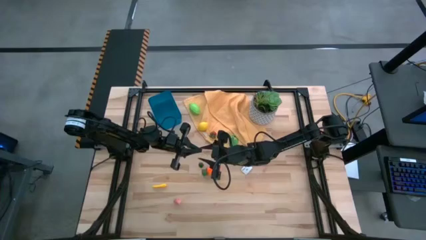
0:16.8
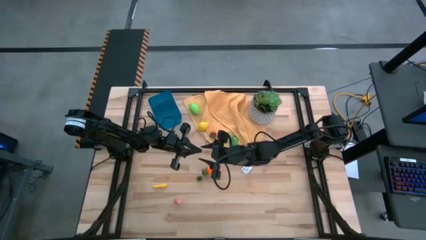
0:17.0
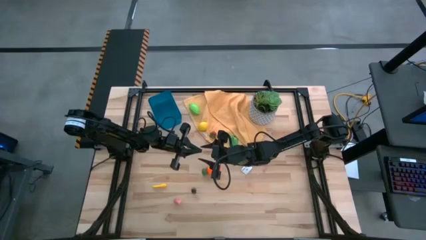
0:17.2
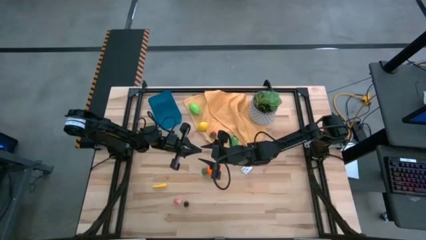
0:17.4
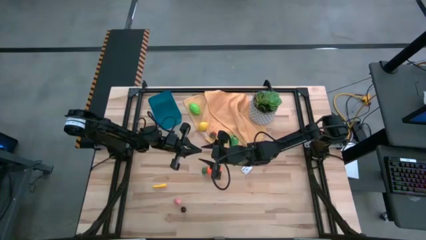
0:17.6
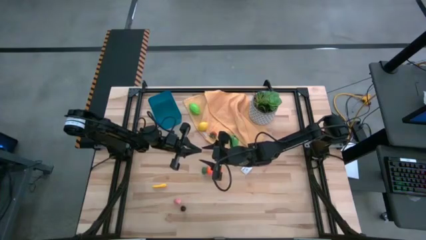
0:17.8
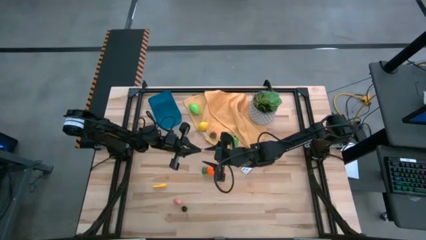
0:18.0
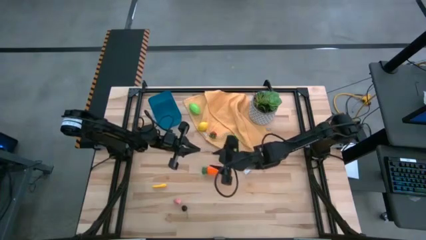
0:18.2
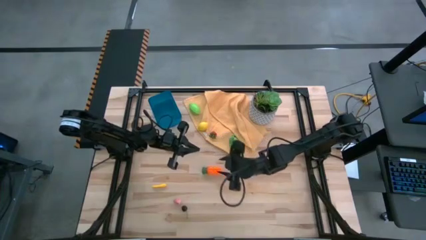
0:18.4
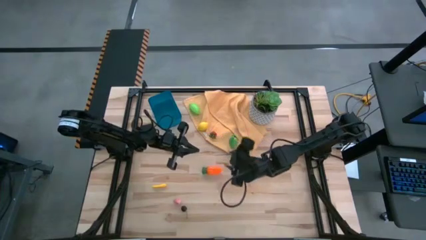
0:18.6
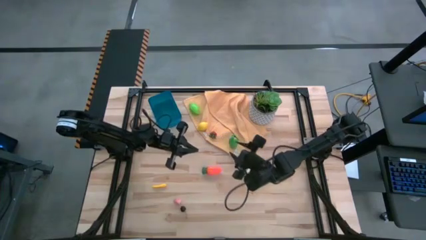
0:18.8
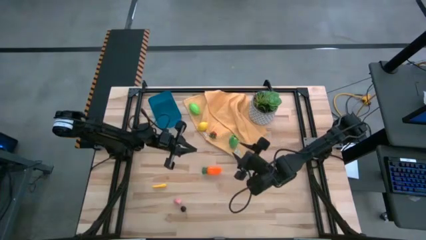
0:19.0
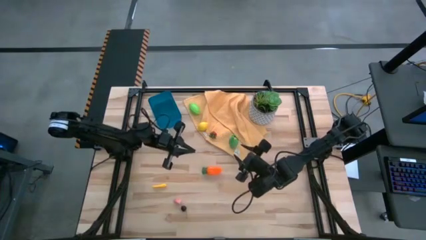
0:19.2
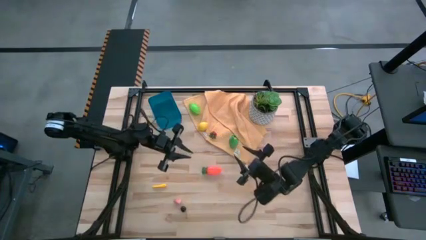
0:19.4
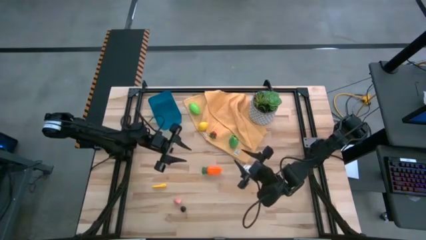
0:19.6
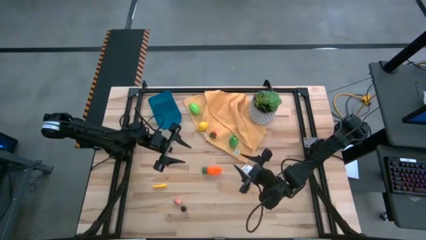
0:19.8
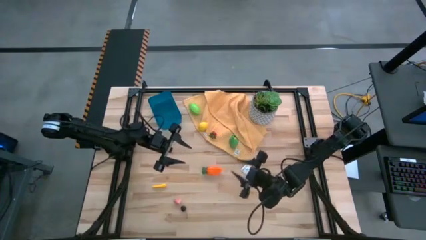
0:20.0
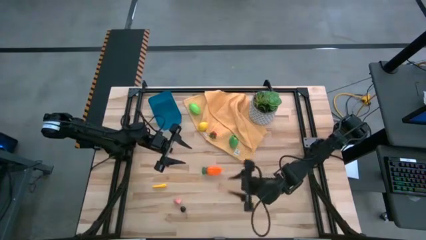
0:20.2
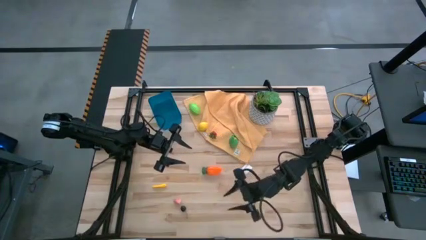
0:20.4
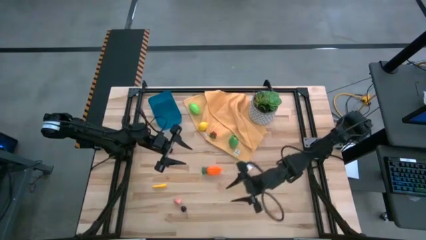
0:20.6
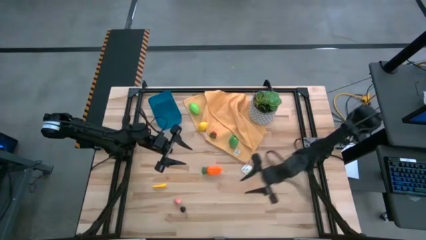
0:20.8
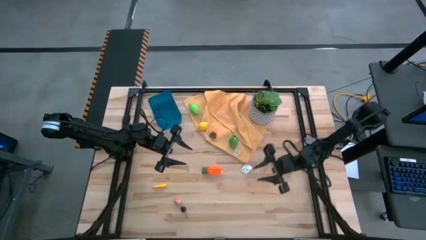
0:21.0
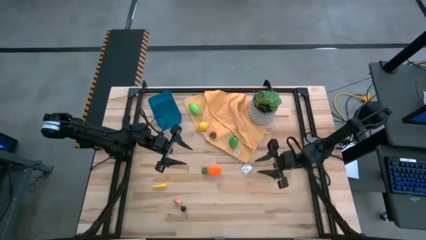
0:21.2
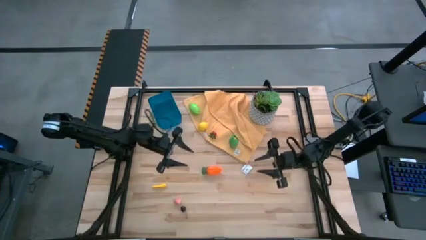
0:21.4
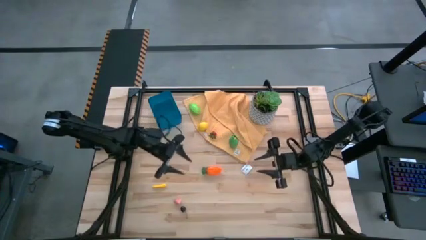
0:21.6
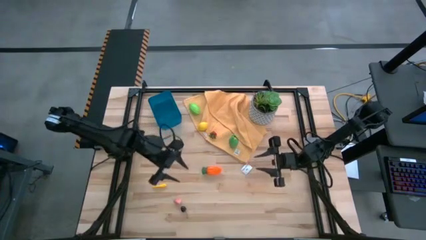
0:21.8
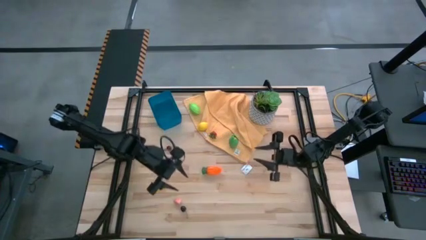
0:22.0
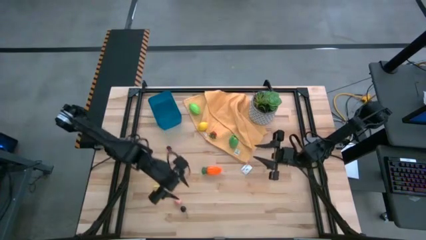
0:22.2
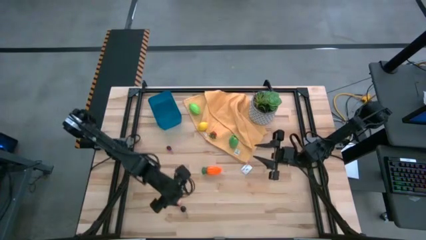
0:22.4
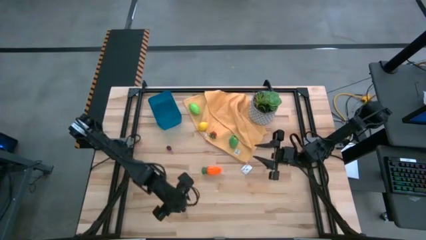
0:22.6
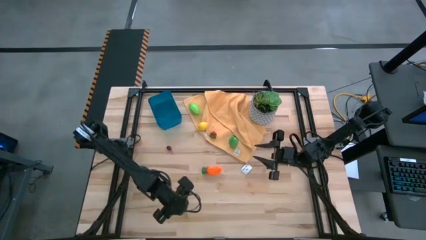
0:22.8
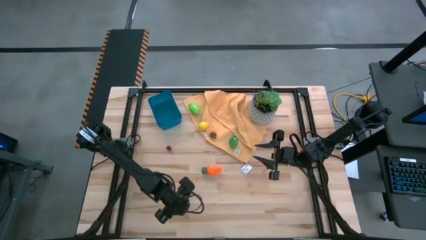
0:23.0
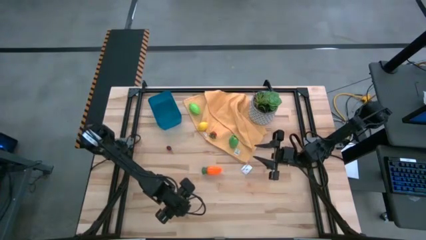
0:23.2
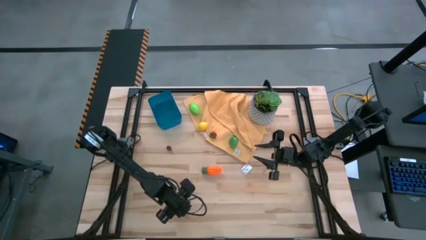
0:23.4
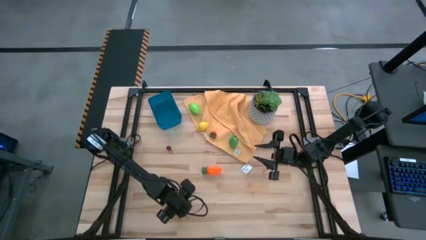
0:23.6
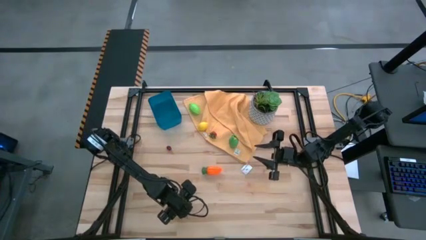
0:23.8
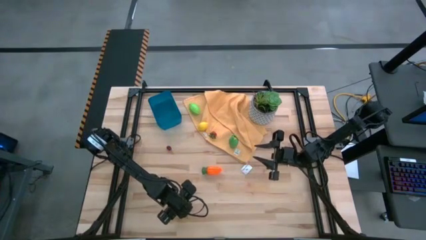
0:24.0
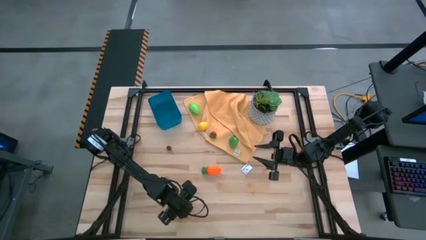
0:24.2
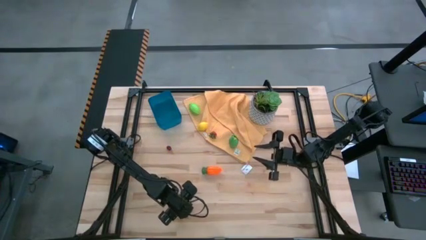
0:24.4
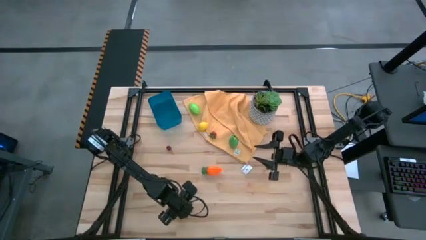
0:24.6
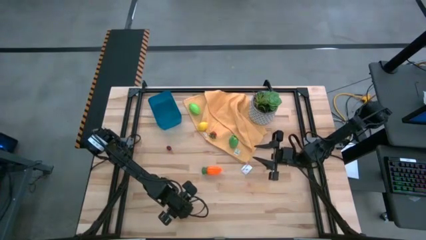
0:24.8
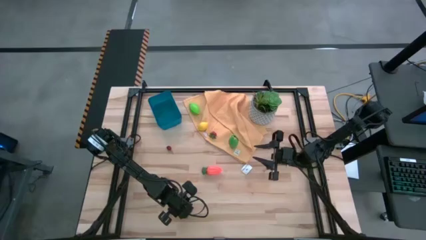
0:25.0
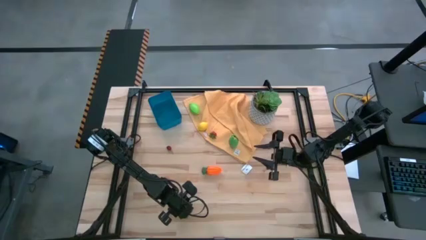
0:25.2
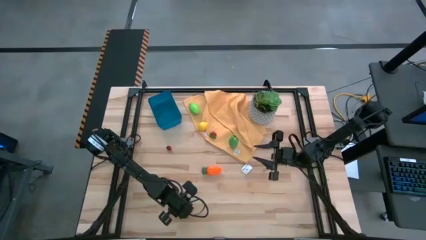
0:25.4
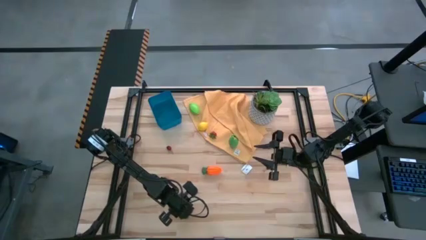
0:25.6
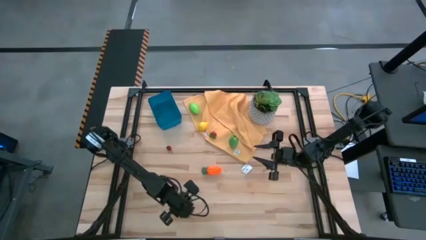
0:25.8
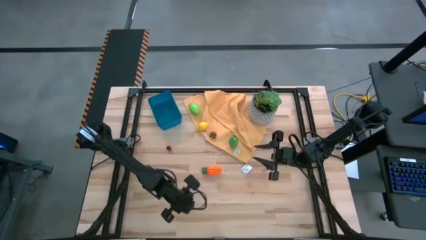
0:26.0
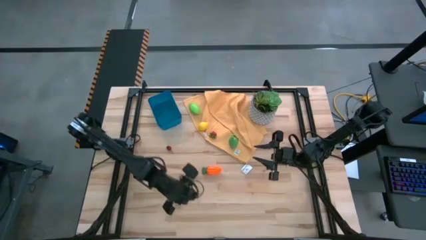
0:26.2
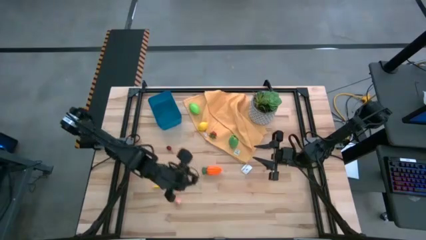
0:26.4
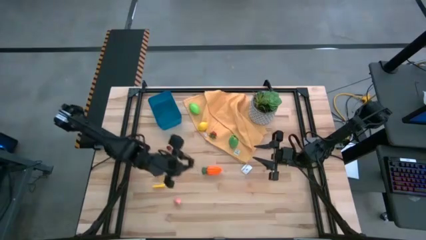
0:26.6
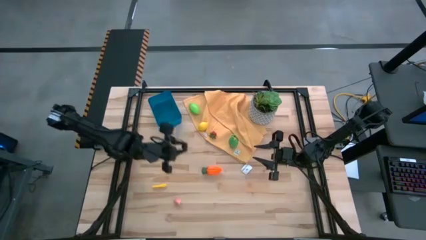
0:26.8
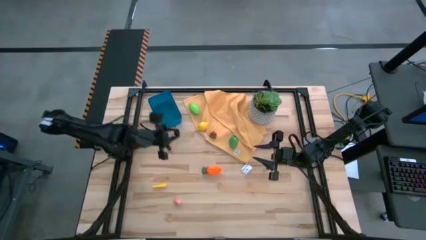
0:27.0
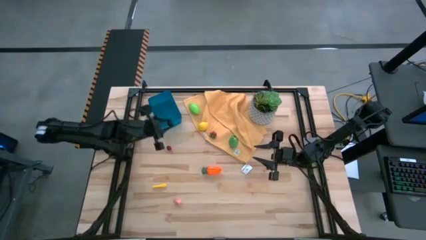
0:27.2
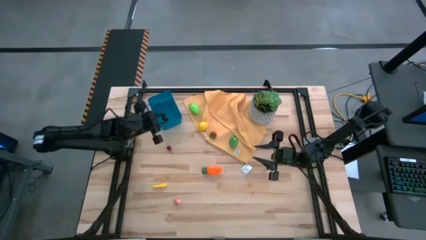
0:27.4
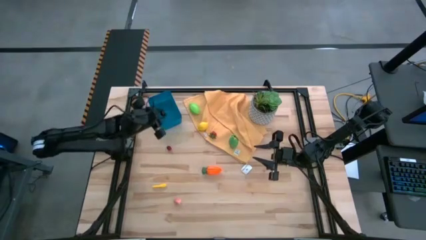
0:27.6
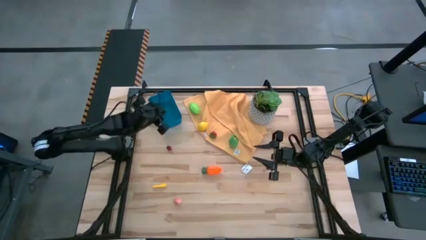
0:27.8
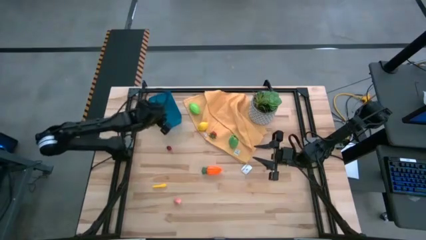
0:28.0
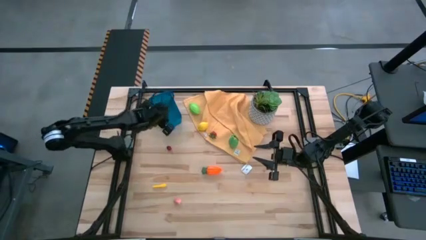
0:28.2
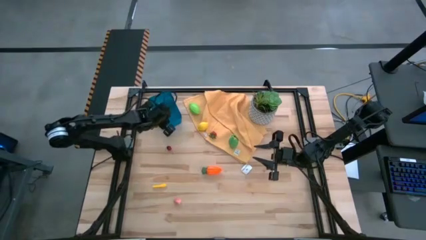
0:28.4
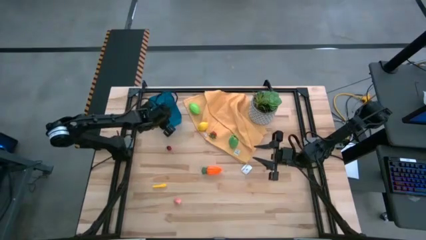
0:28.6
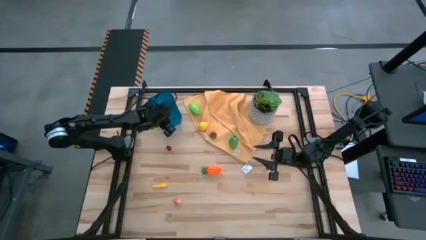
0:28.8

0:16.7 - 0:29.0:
Task: Pick and placing Produce into tupperware
Put the black cherry into the blue bin

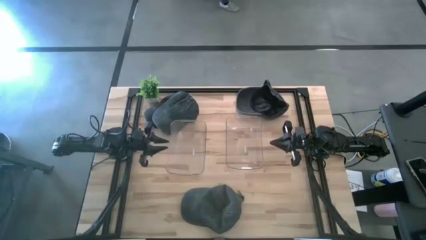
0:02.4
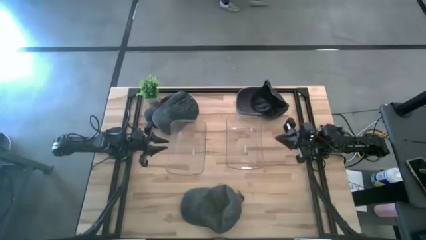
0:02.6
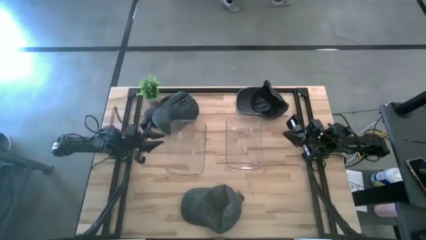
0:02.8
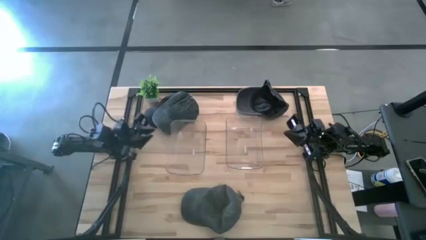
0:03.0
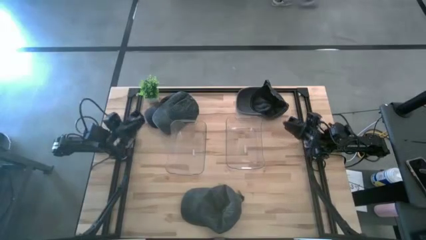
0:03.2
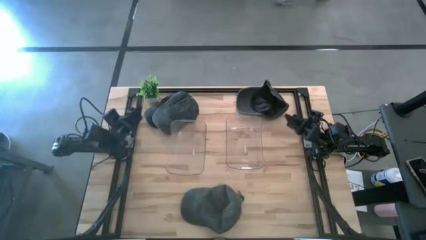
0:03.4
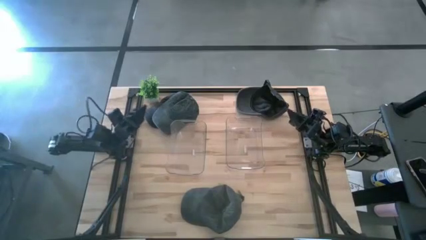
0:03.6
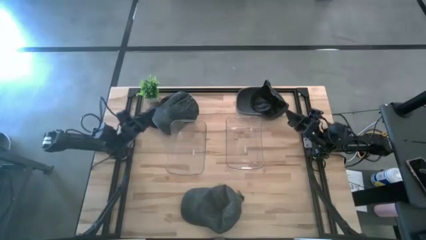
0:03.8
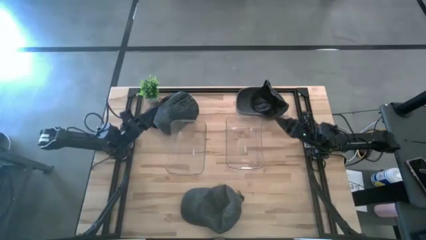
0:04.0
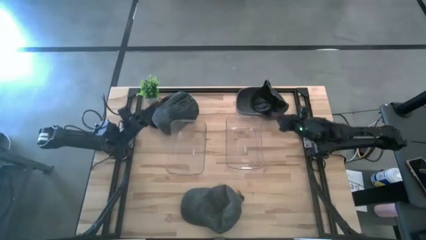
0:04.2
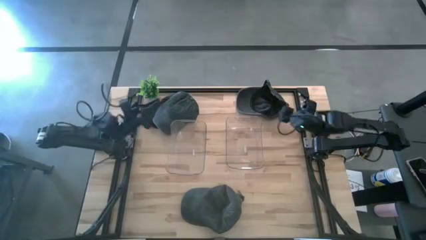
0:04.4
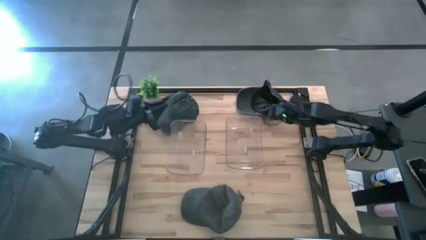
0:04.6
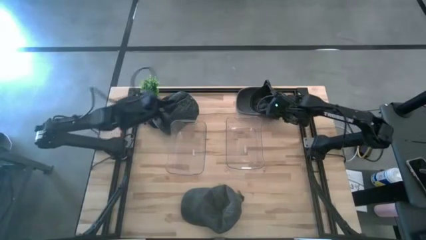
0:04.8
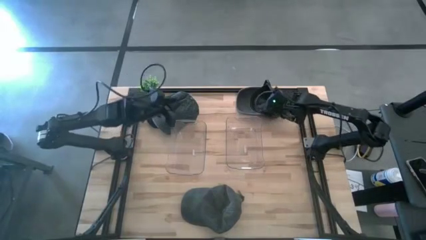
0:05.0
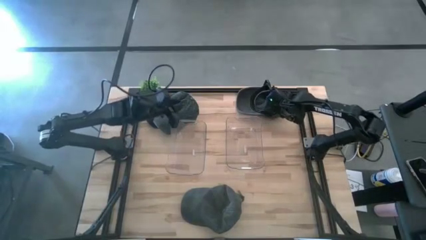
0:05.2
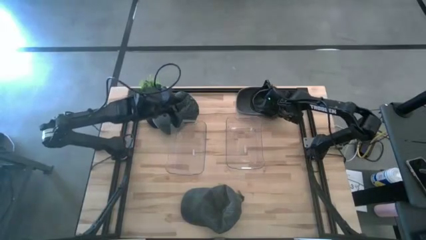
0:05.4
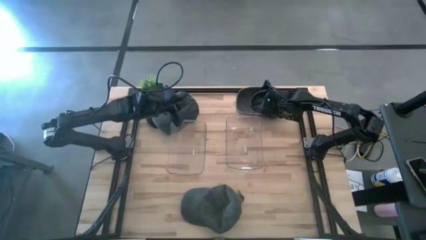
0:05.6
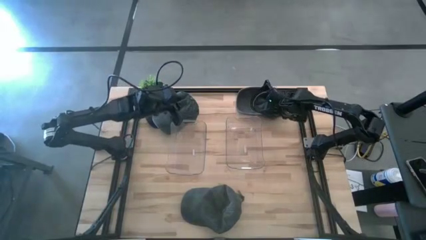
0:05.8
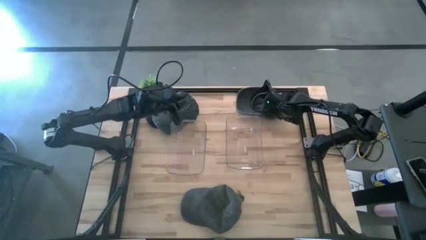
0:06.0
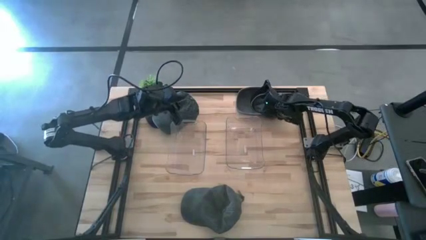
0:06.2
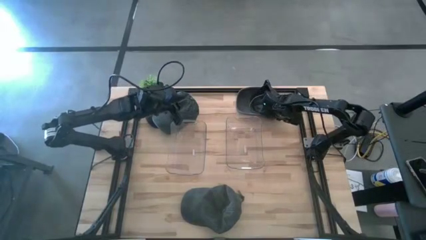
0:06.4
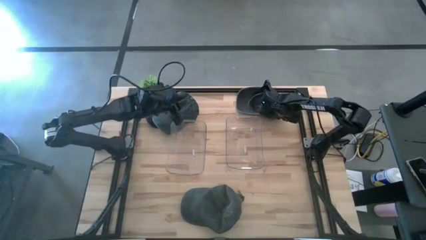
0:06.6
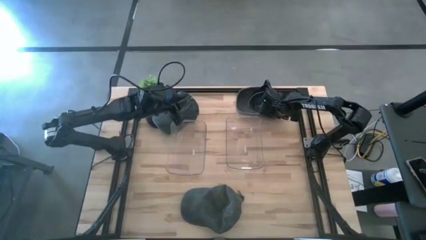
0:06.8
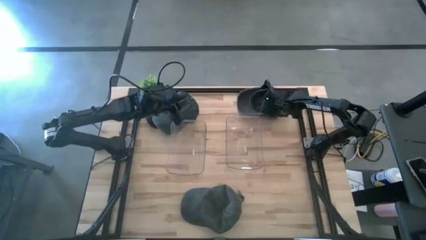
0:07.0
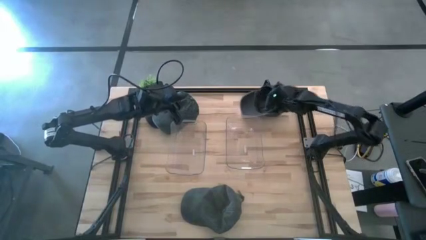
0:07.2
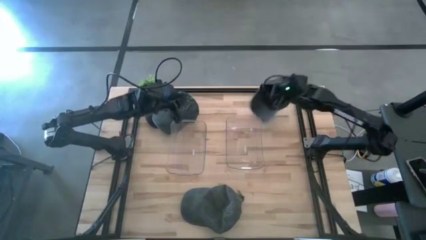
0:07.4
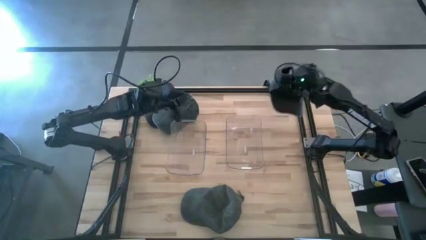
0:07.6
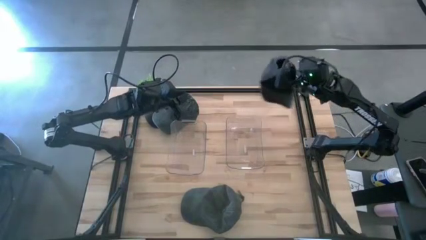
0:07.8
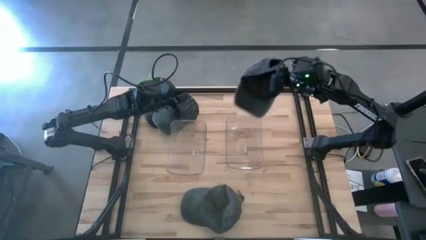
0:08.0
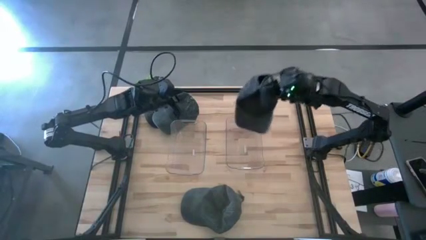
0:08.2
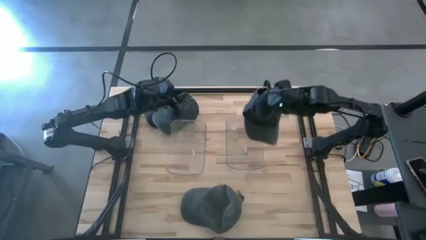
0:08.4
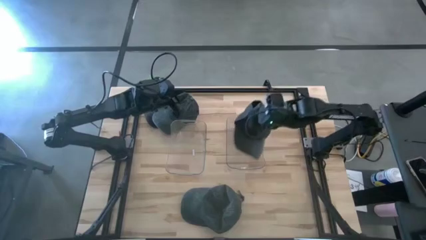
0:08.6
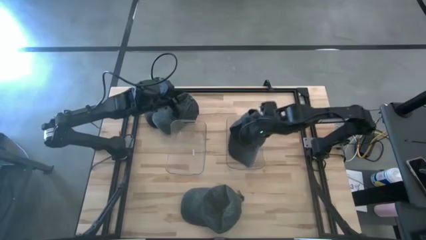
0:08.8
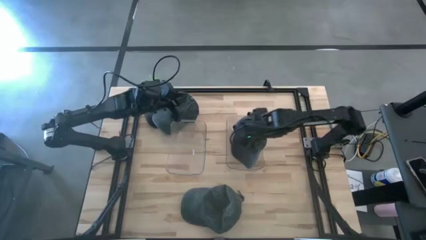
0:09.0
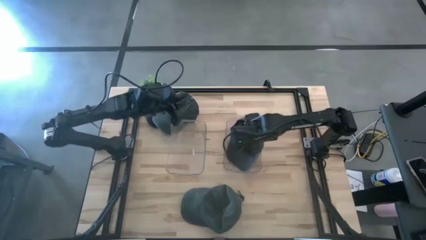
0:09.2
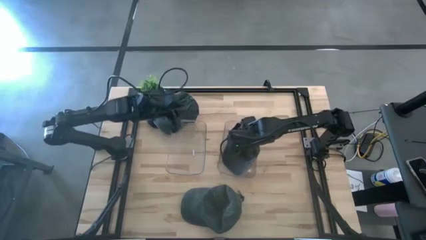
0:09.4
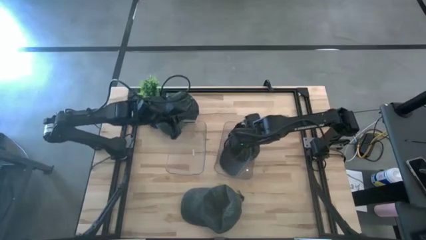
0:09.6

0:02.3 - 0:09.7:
Task: Pick & Place hat
Put the right black cap into the right transparent bin
